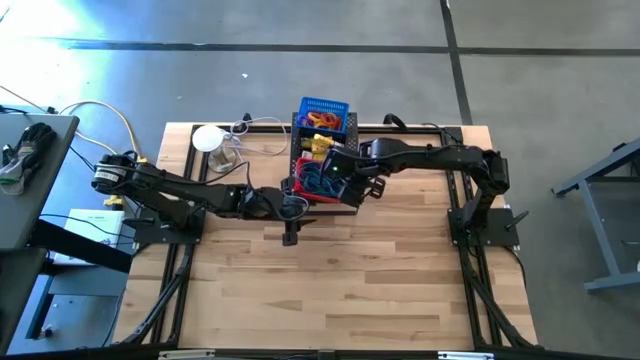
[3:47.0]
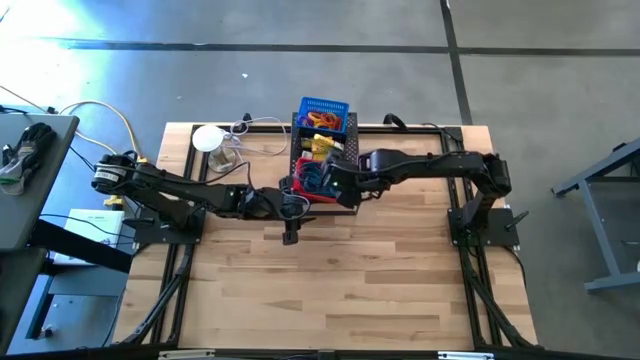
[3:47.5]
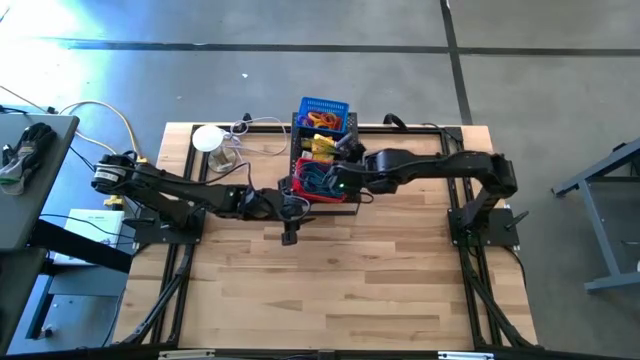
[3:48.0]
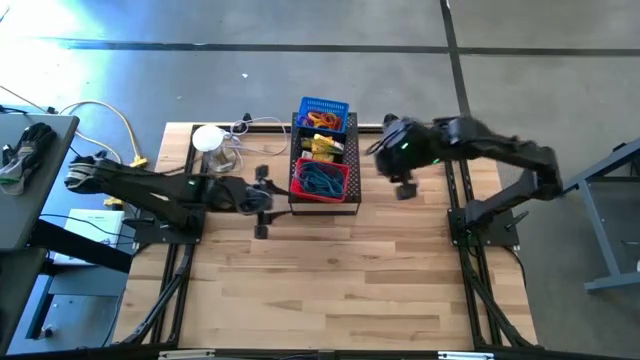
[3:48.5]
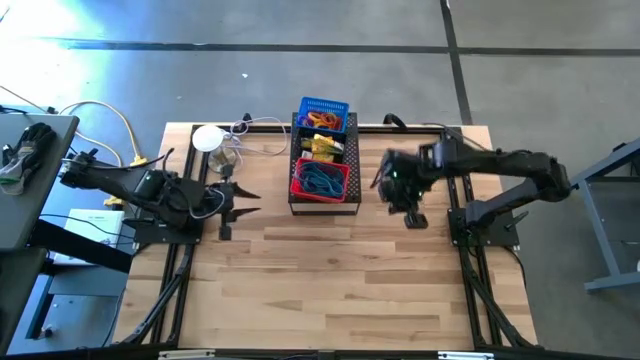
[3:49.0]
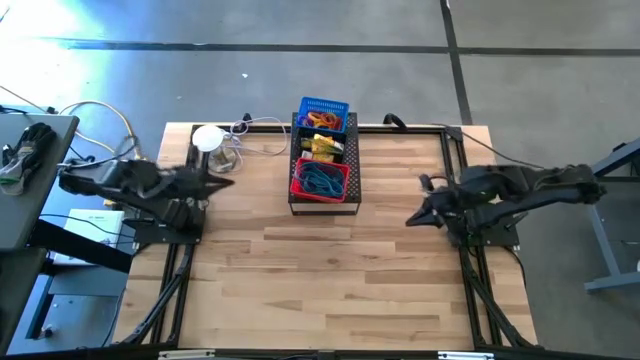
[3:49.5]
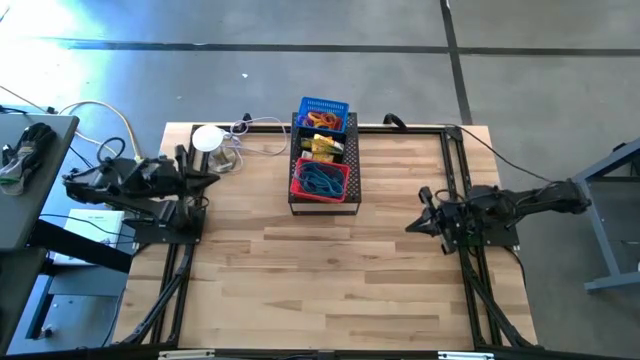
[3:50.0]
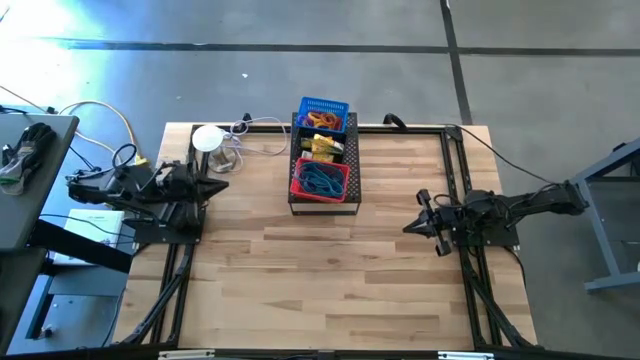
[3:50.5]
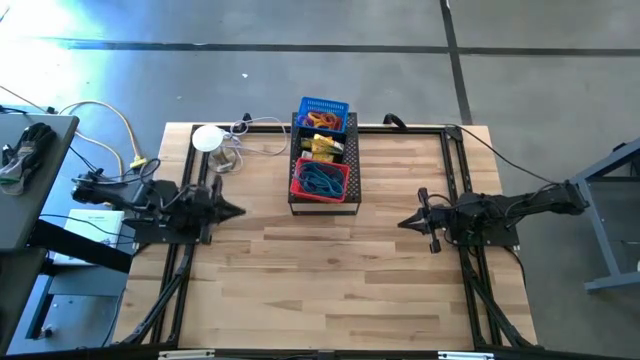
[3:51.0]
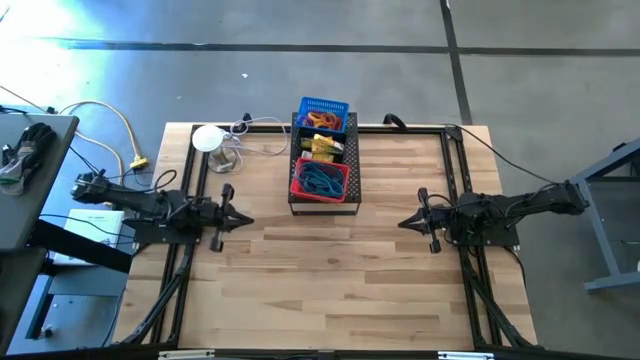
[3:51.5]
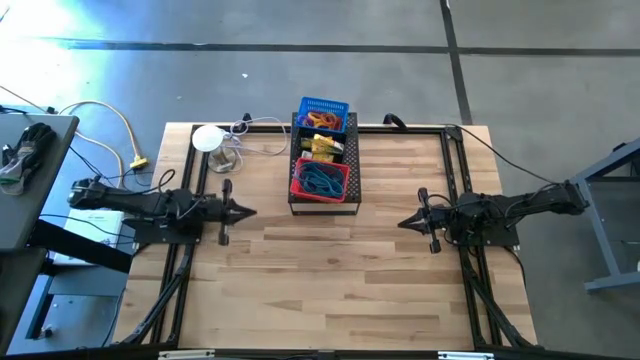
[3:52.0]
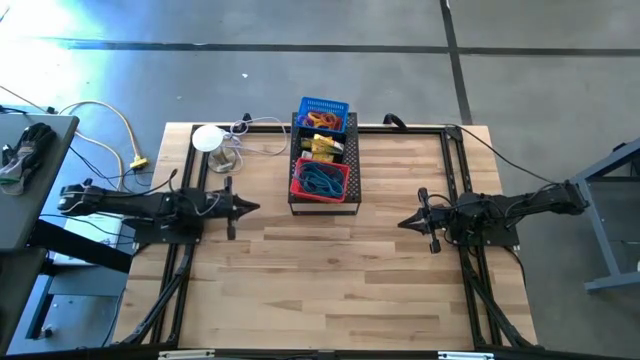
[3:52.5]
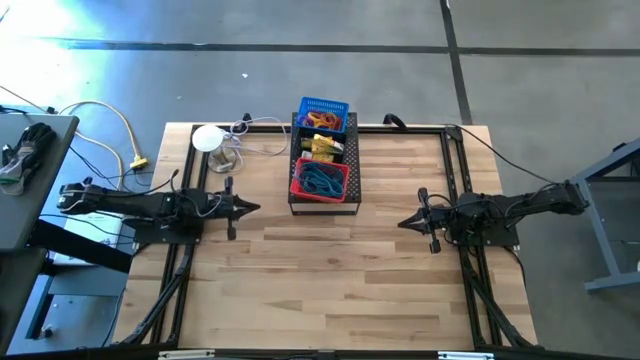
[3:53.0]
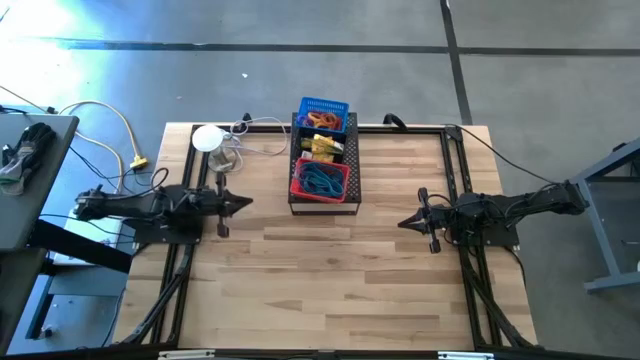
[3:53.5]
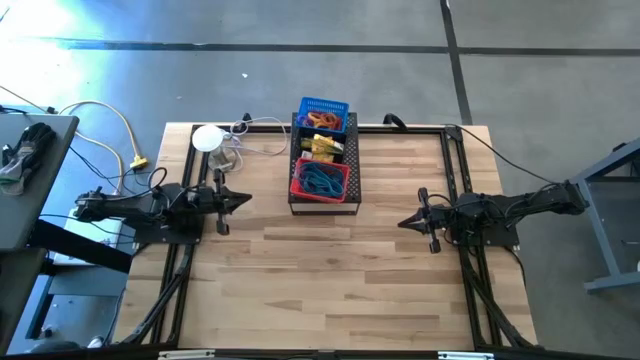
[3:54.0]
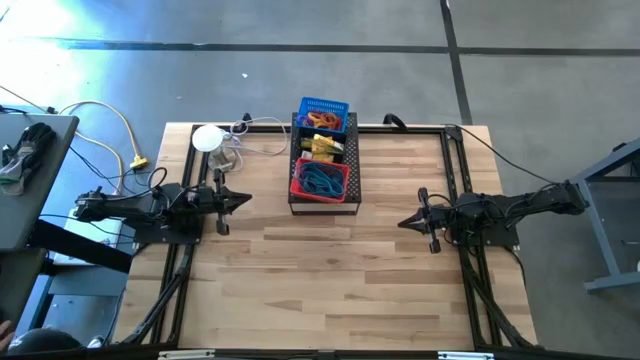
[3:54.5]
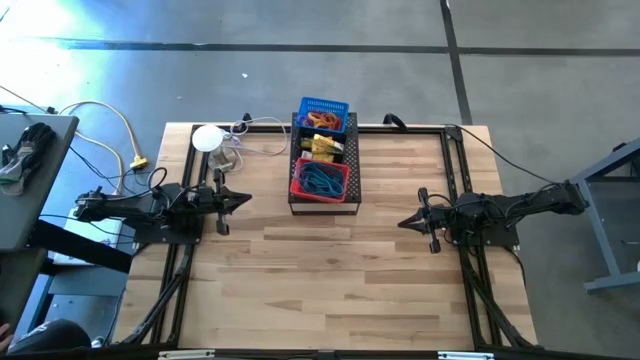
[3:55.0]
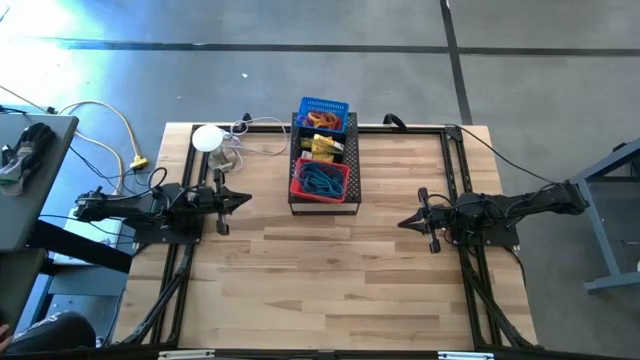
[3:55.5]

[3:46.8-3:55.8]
Task: Pick & Place Office Desk Supplies
Return to Home Position

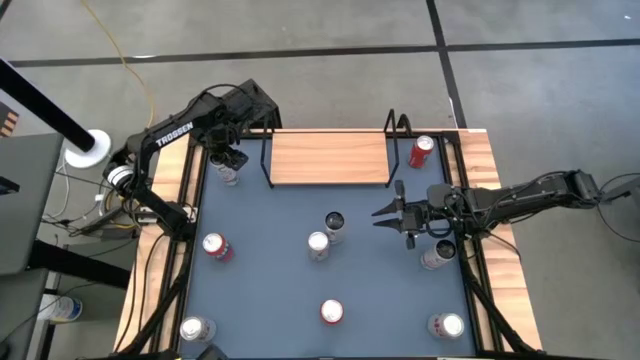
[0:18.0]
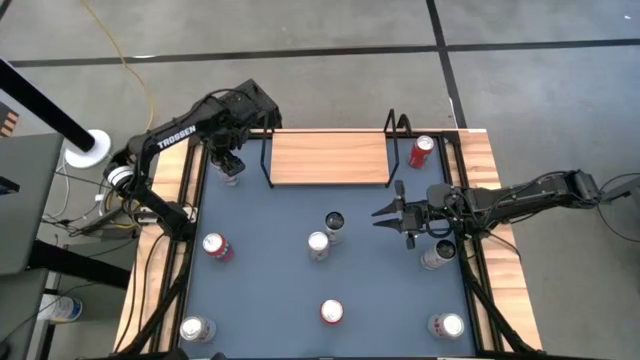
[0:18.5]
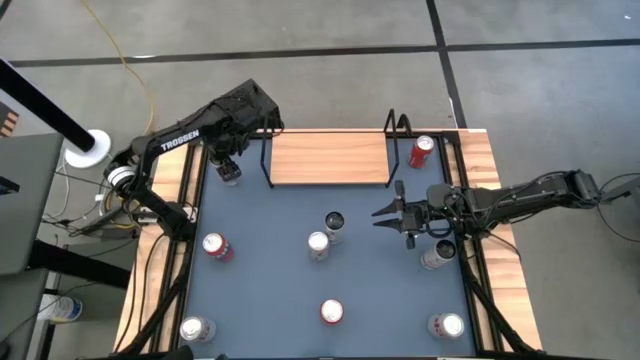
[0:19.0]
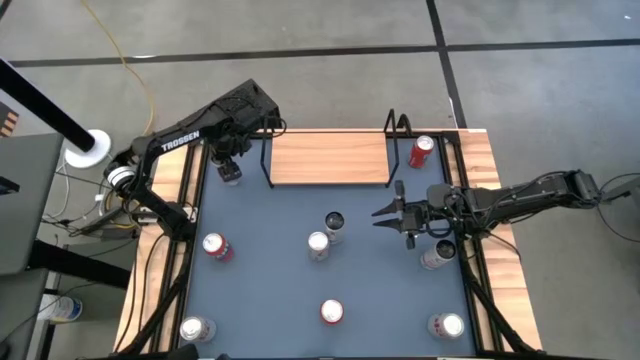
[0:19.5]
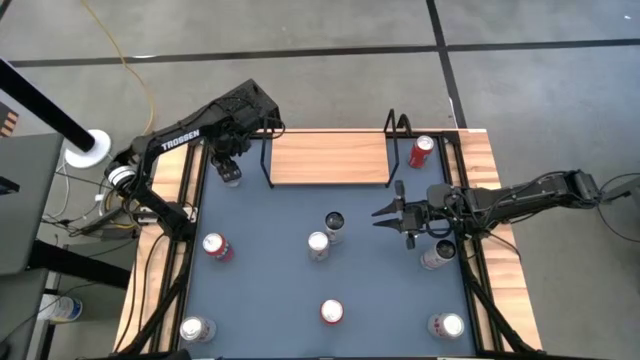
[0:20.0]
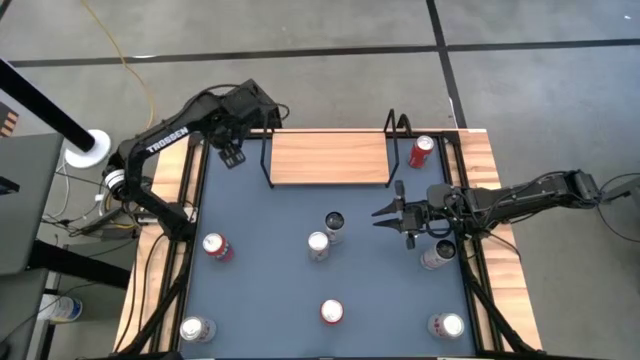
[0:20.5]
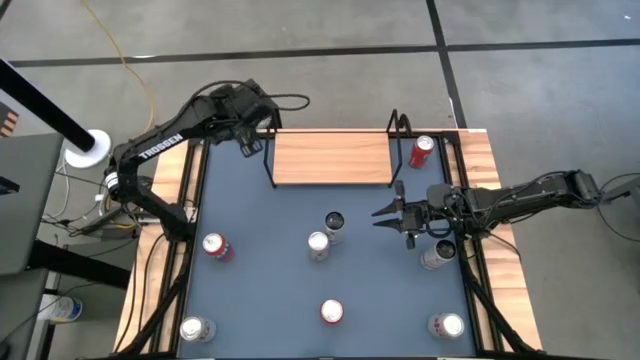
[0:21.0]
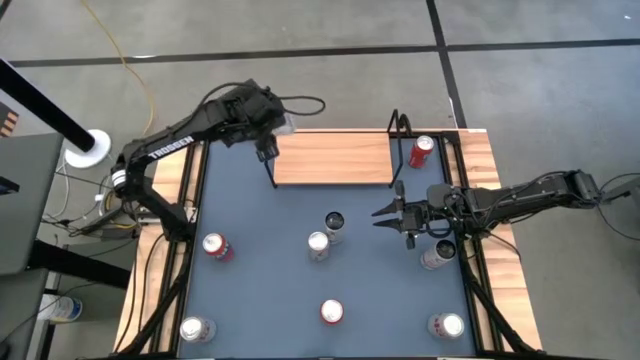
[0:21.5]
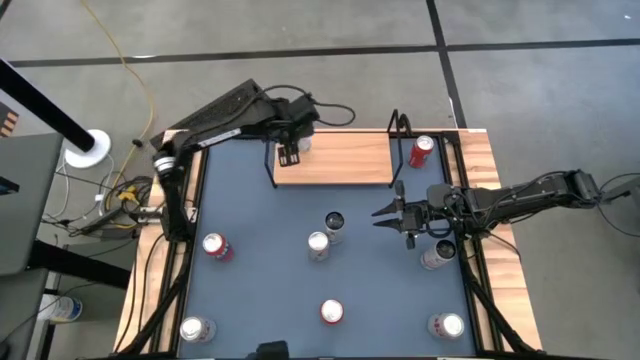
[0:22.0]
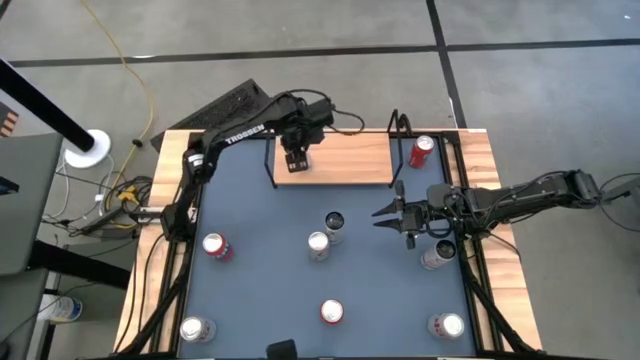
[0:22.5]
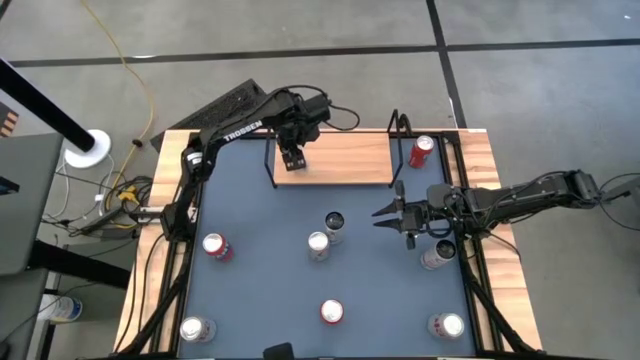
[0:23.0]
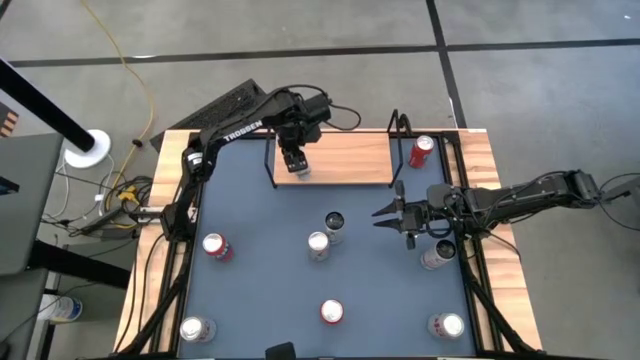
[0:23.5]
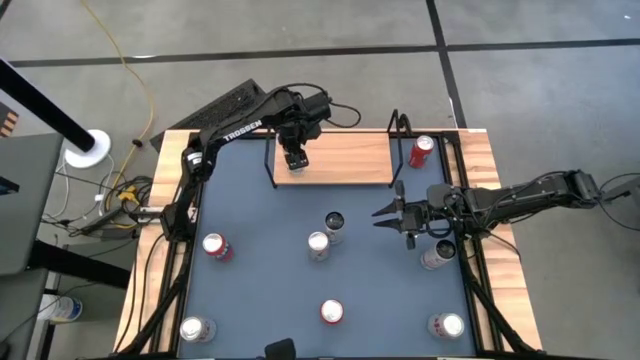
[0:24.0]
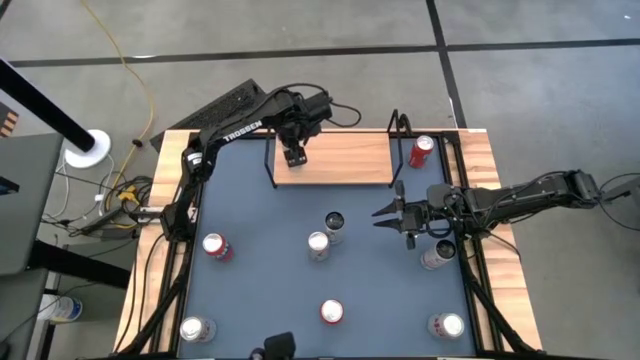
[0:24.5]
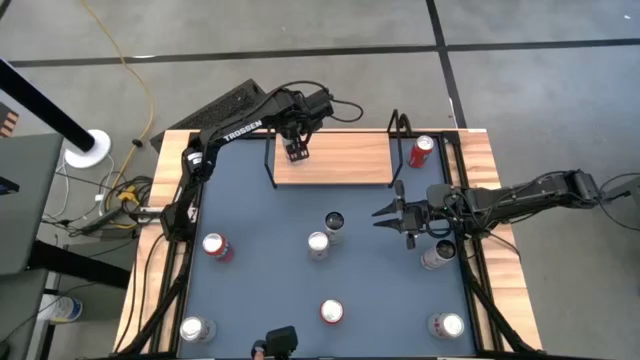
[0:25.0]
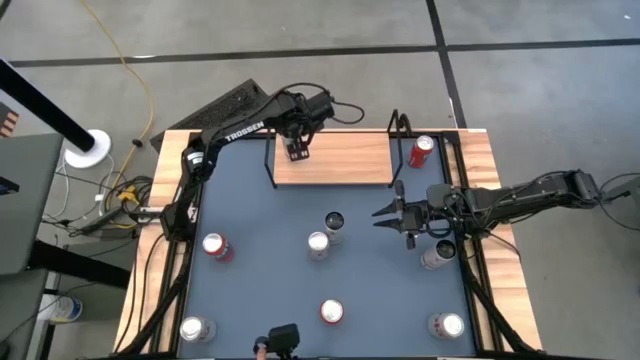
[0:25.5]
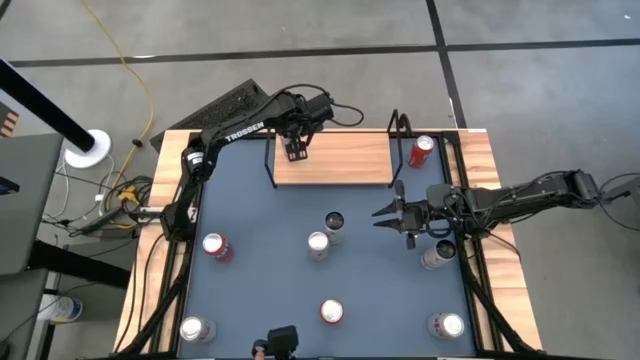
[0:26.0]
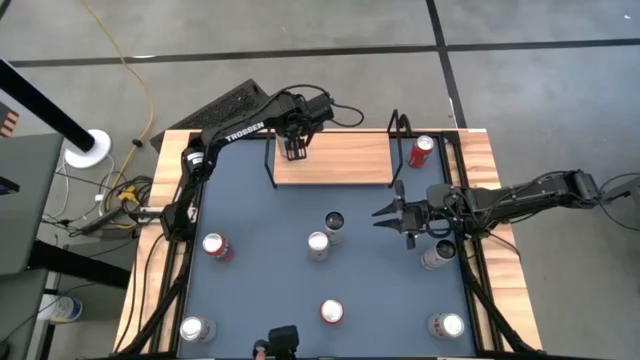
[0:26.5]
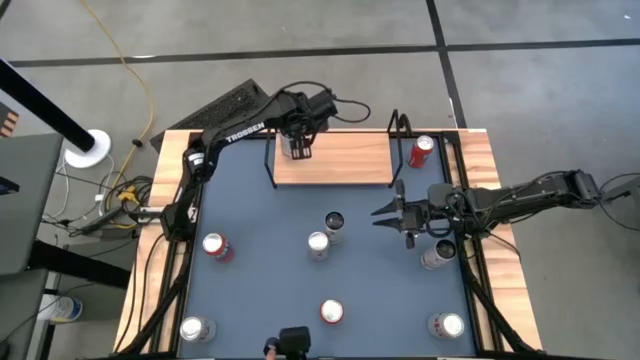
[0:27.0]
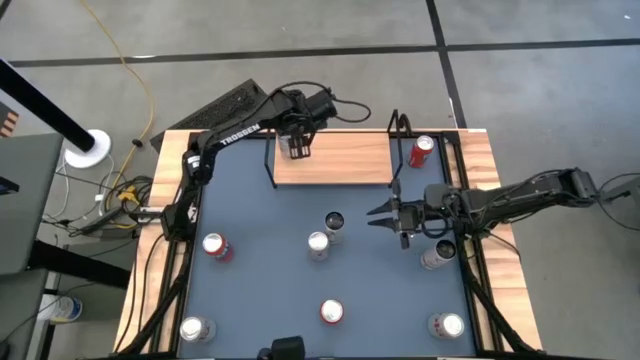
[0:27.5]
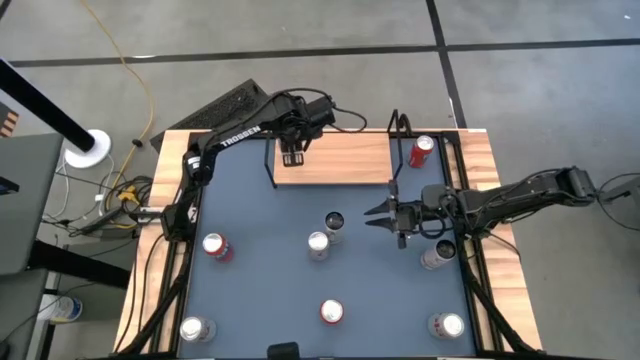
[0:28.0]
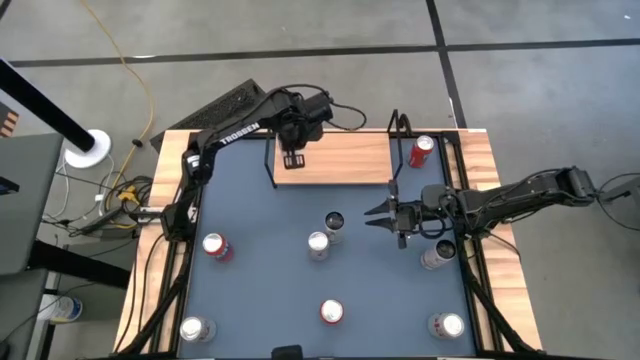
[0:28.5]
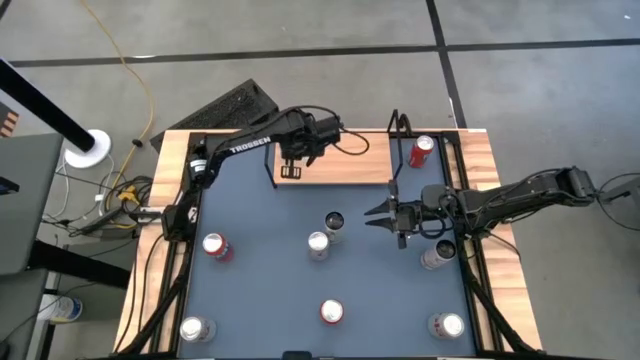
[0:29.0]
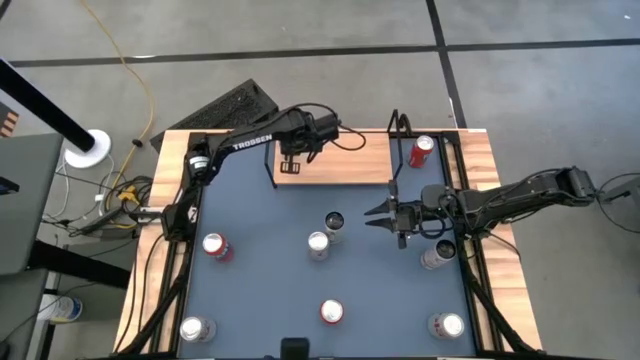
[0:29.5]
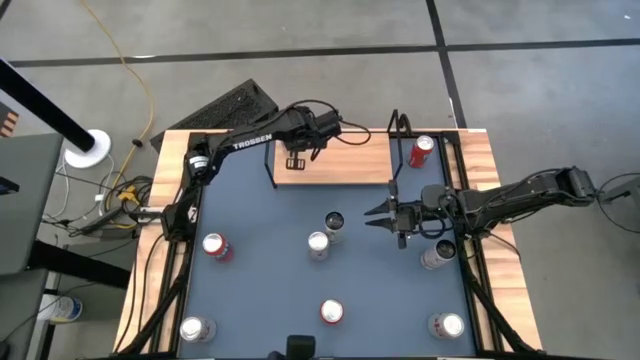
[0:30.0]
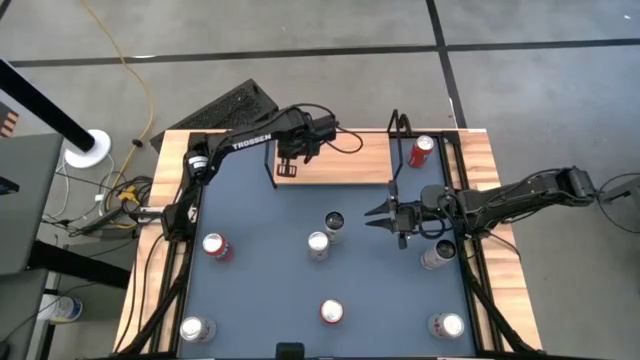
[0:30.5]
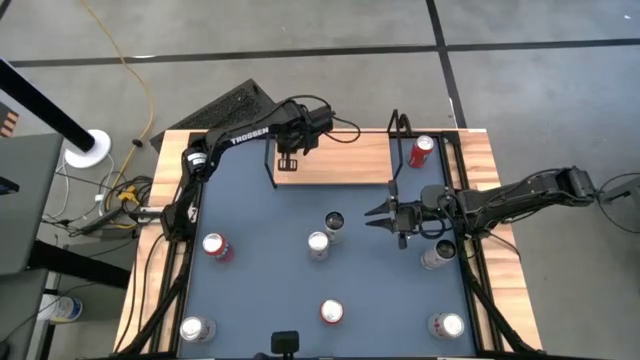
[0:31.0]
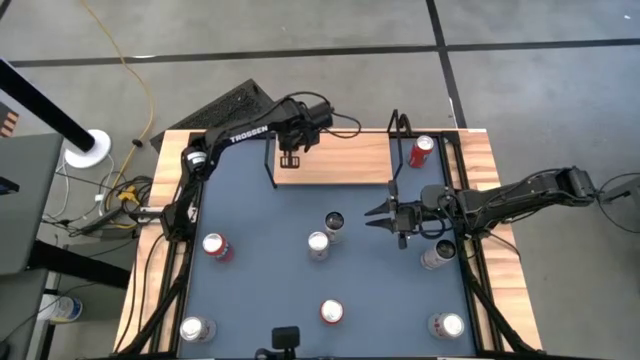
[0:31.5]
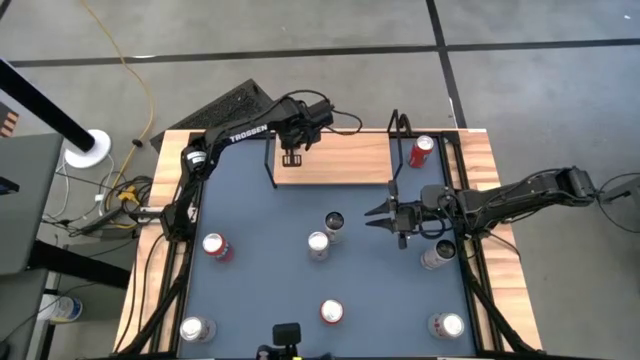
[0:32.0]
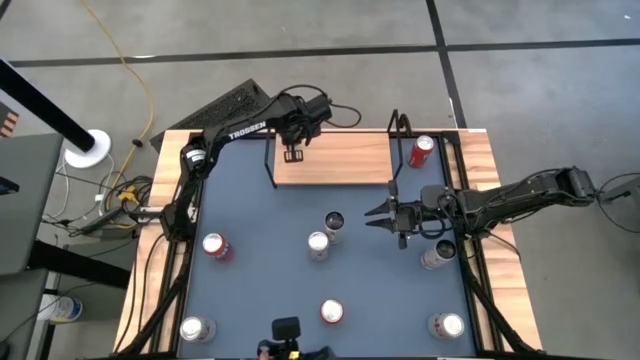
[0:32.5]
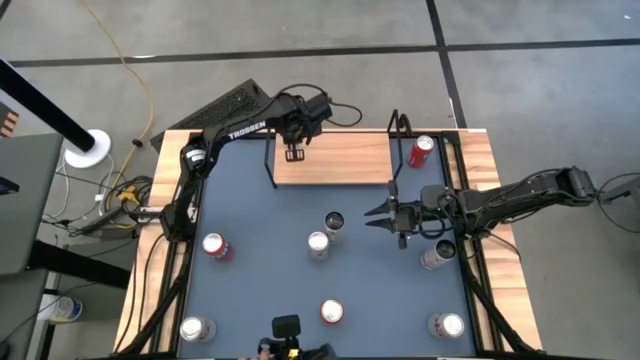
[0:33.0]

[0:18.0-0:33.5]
Task: Place canned beverage on shelf
Put the top white-pink soda can on the shelf
